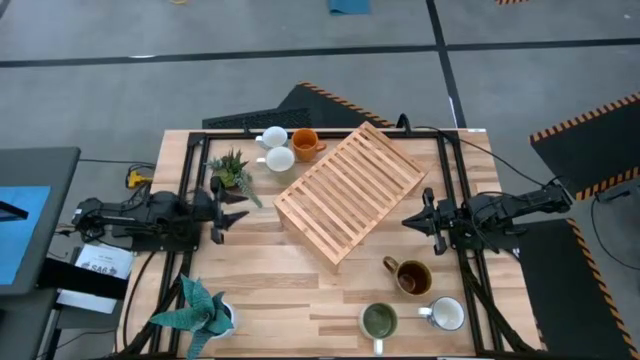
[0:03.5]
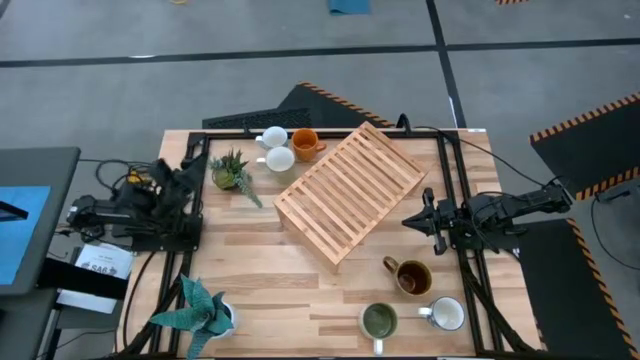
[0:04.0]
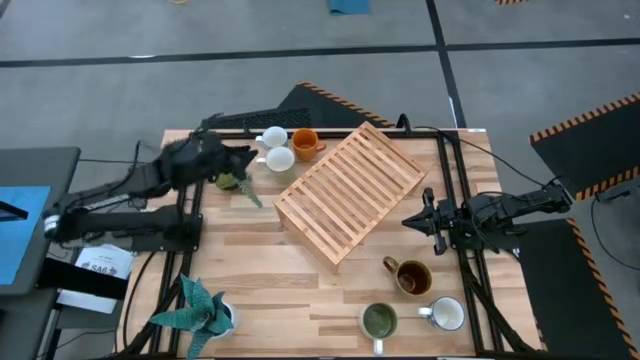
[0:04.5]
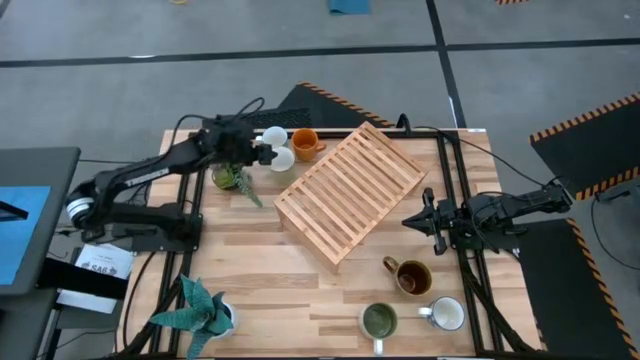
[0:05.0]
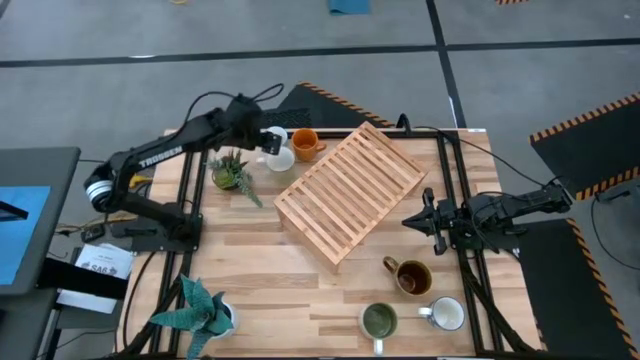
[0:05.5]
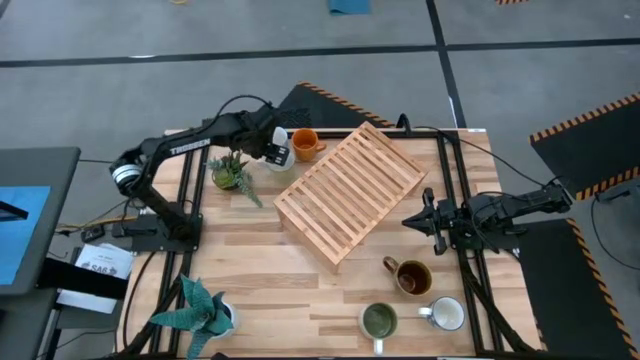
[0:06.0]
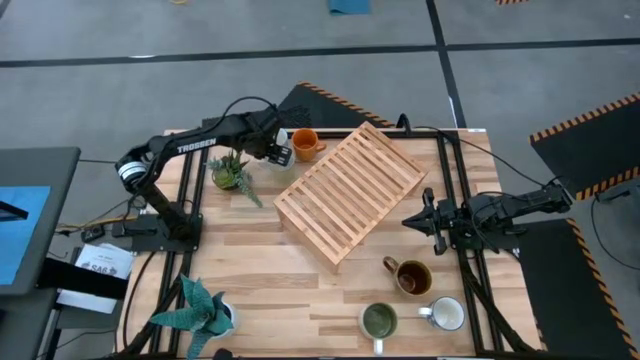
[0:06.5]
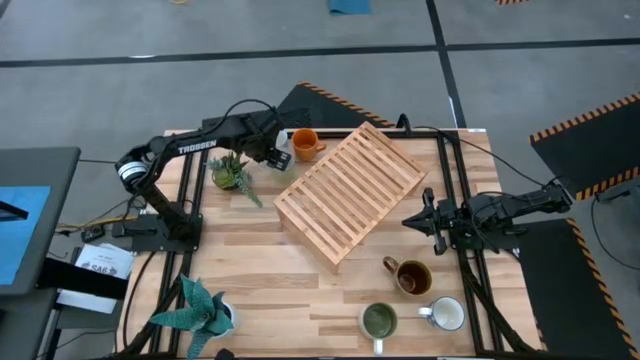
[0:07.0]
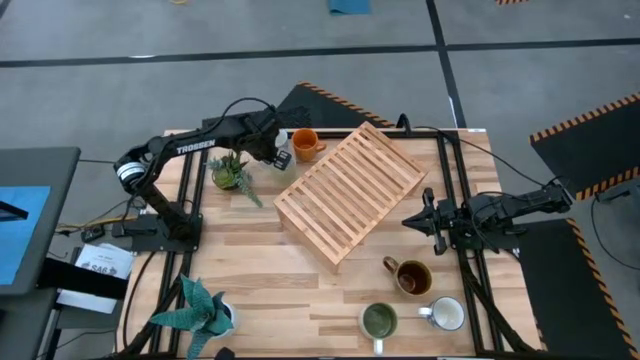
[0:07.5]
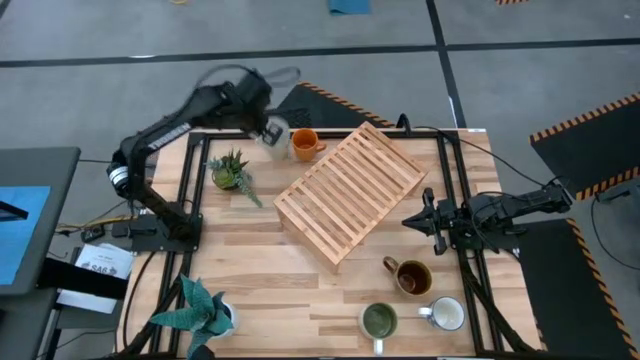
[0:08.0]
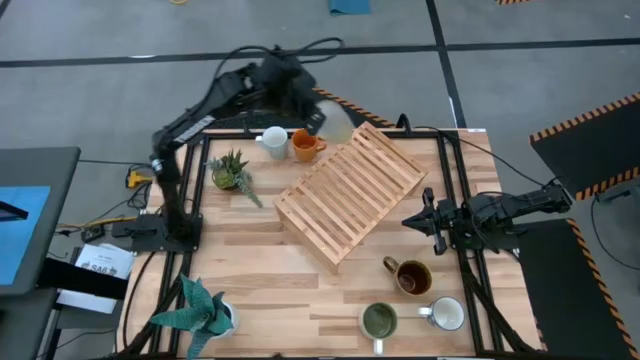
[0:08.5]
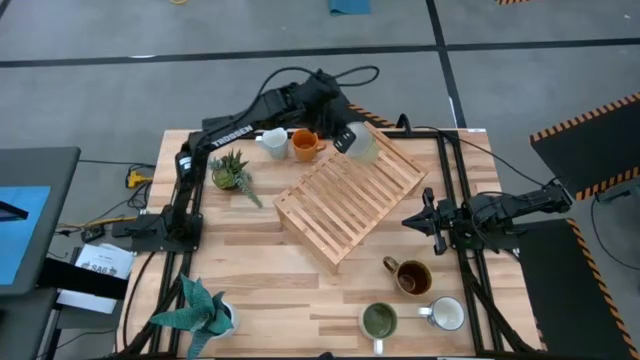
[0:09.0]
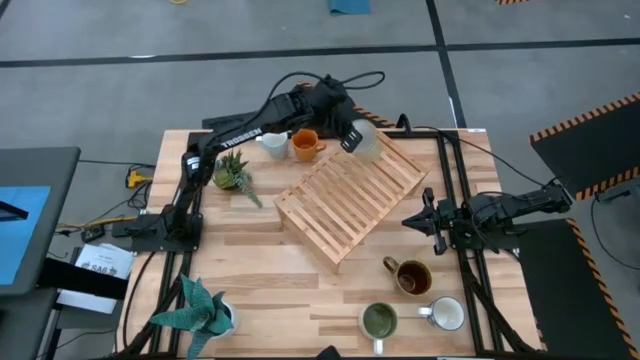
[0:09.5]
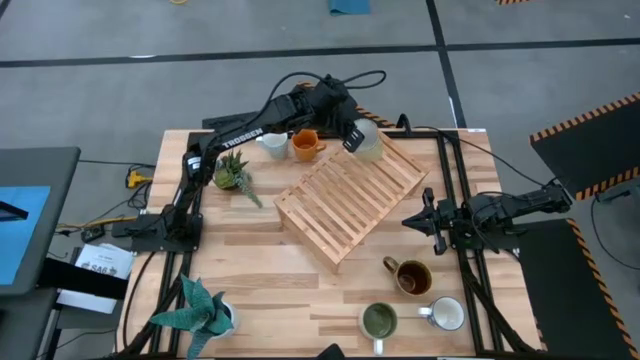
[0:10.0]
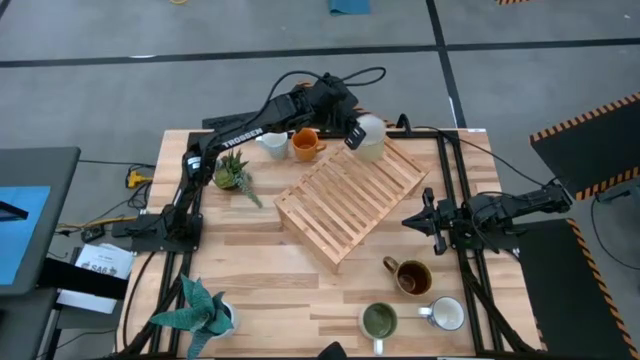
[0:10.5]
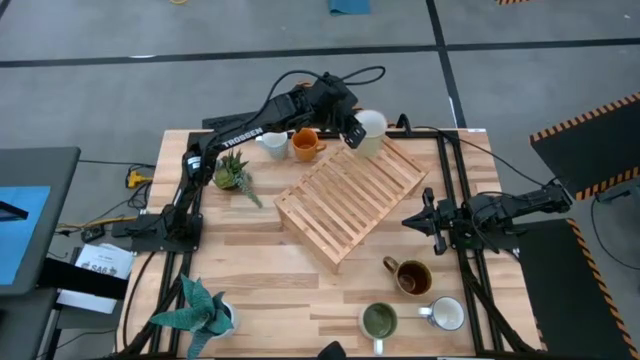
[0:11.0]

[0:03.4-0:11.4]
Task: Place coffee mugs
Put the light green mug on the shelf

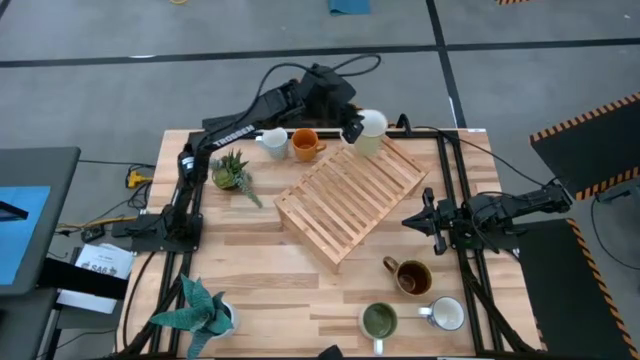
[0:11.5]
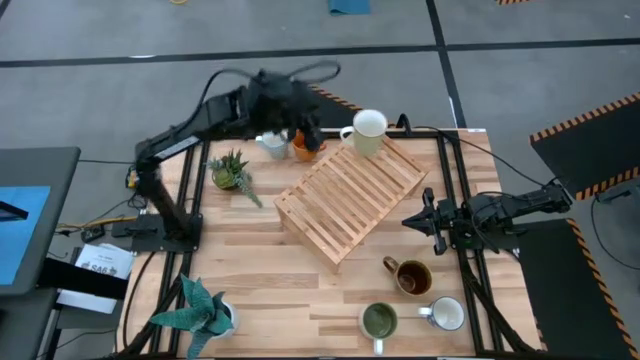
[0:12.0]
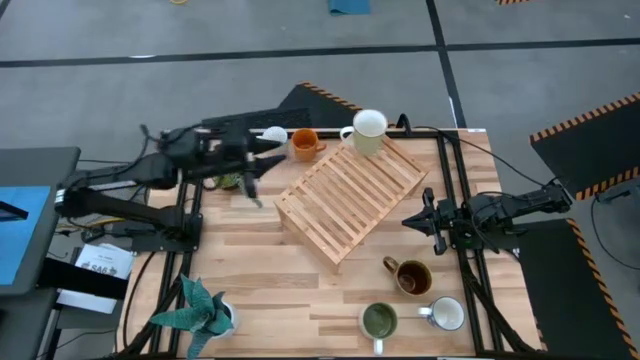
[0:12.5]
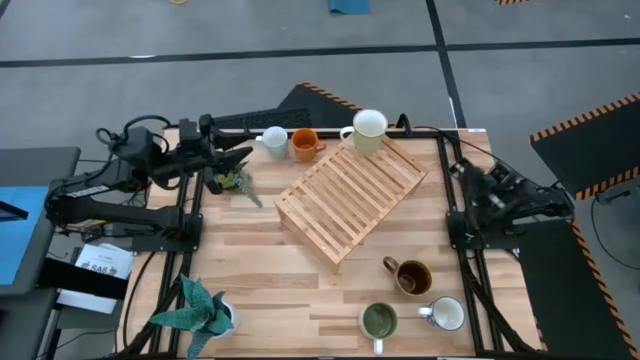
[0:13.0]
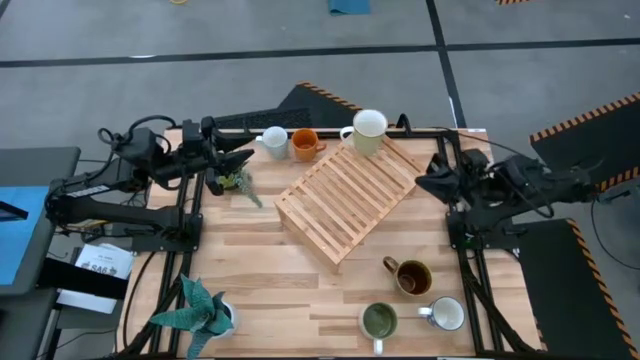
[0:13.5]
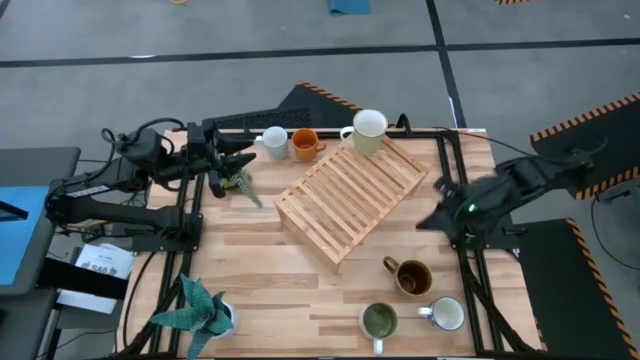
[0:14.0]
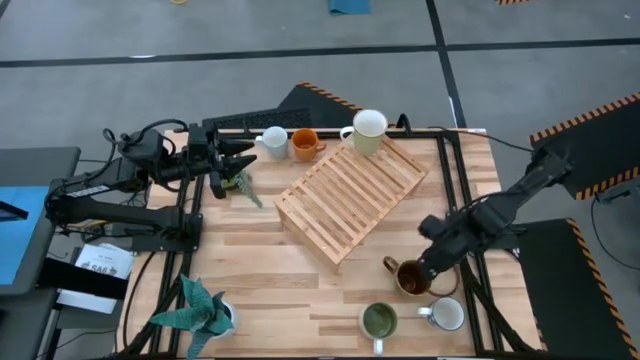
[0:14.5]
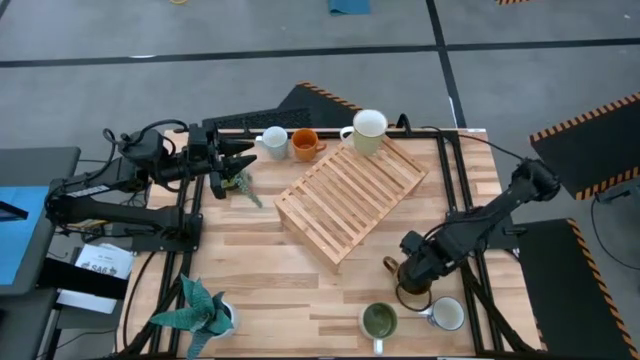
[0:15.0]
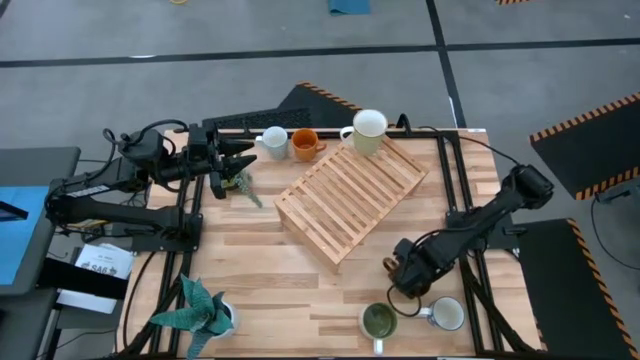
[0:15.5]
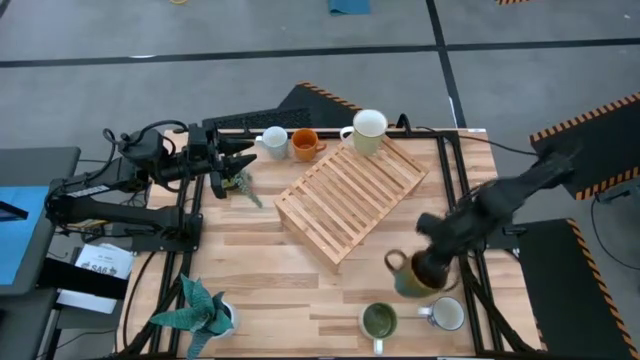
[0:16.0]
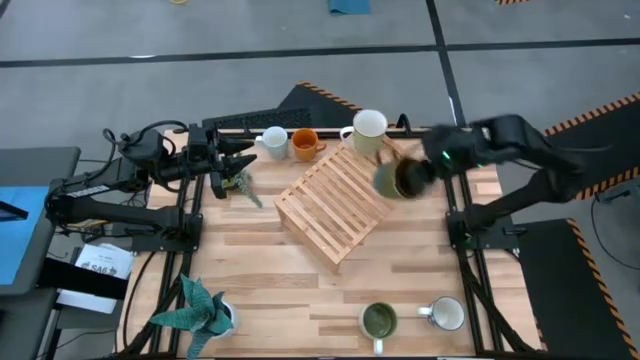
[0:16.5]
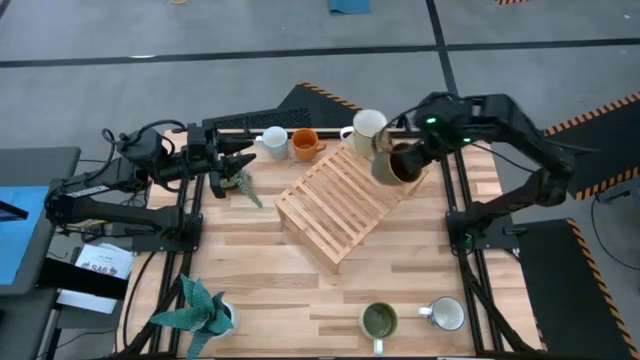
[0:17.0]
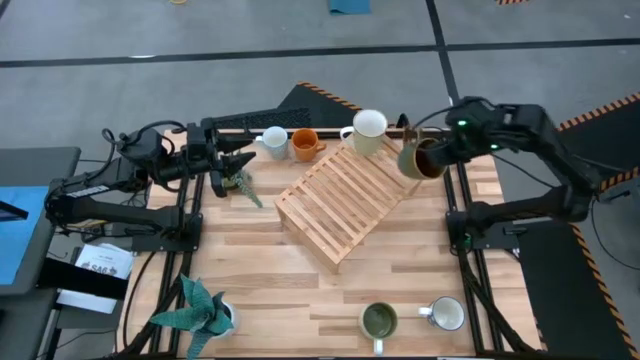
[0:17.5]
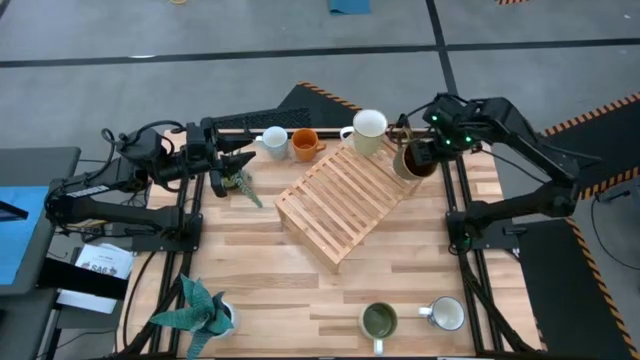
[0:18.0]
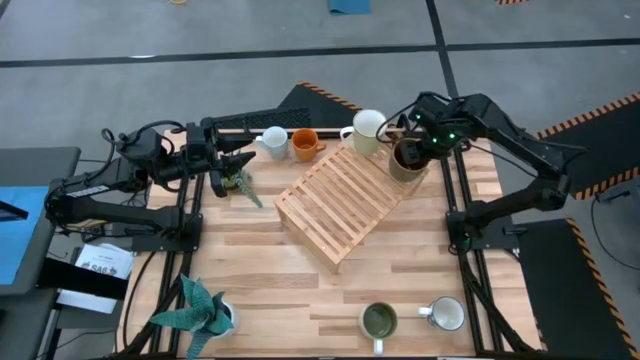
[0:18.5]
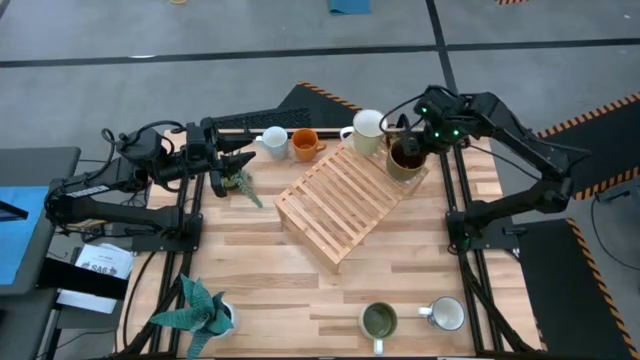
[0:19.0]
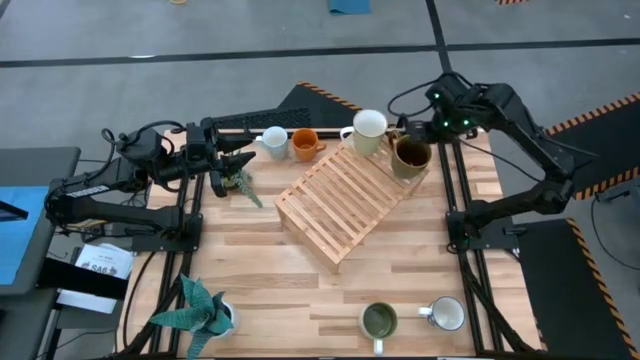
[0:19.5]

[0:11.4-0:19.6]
Put the green mug on the shelf

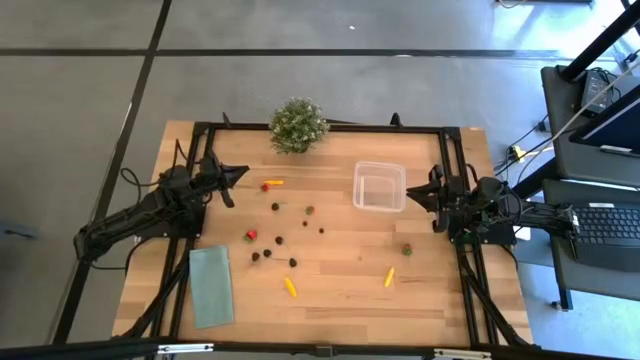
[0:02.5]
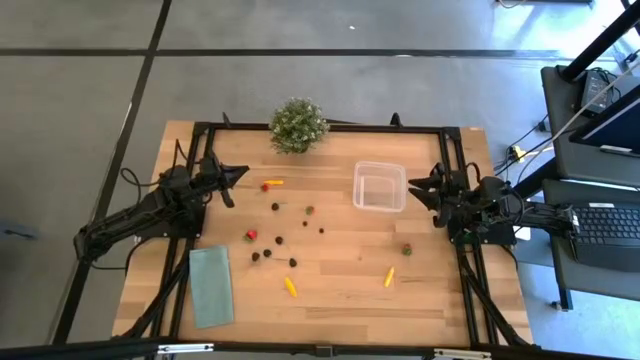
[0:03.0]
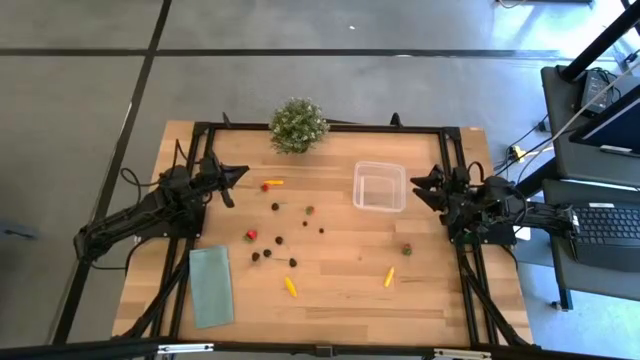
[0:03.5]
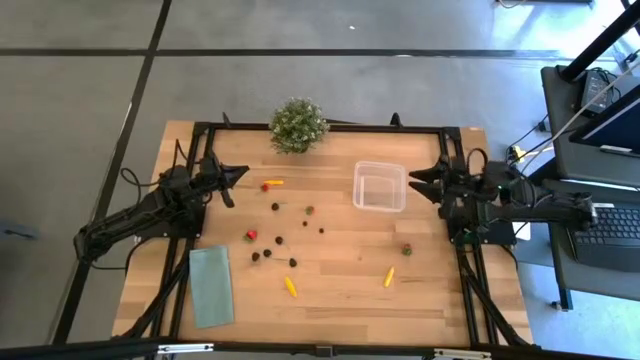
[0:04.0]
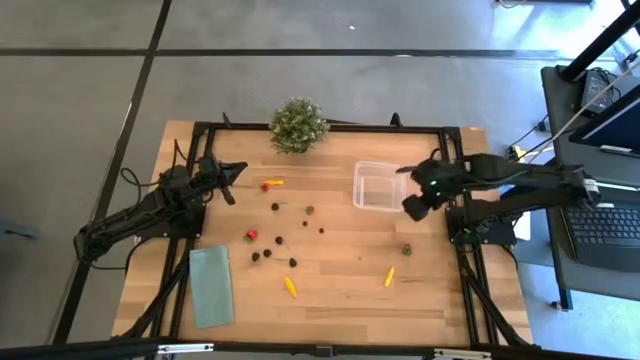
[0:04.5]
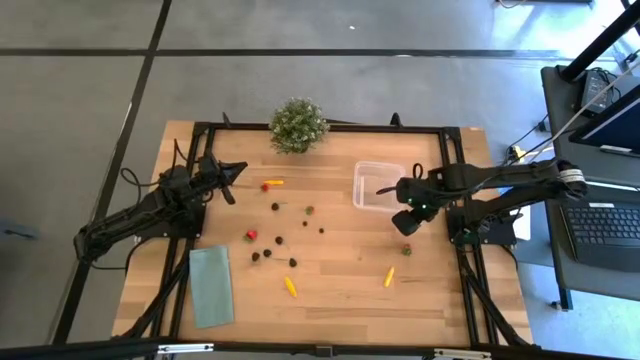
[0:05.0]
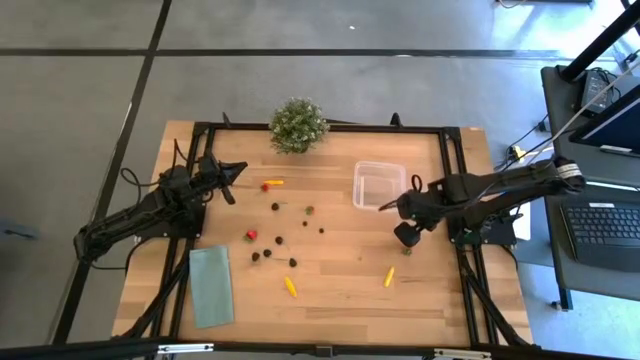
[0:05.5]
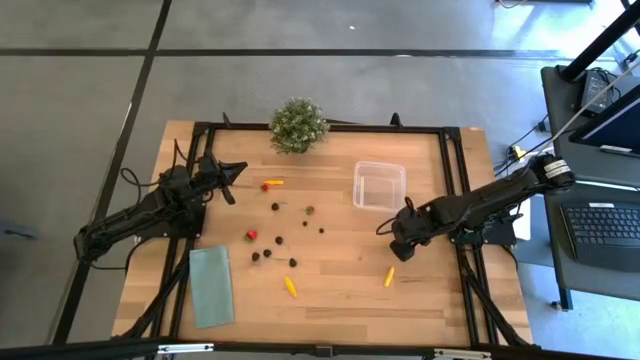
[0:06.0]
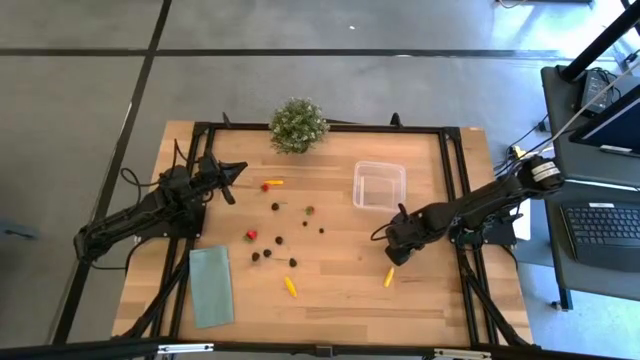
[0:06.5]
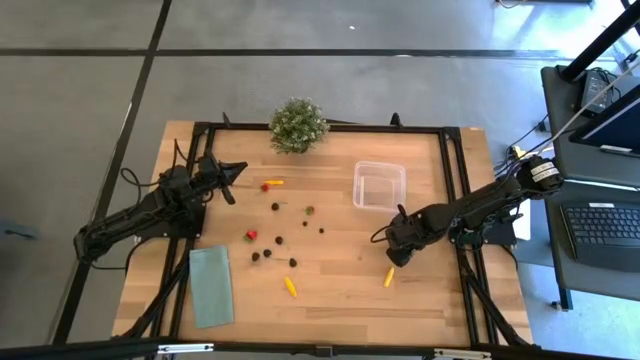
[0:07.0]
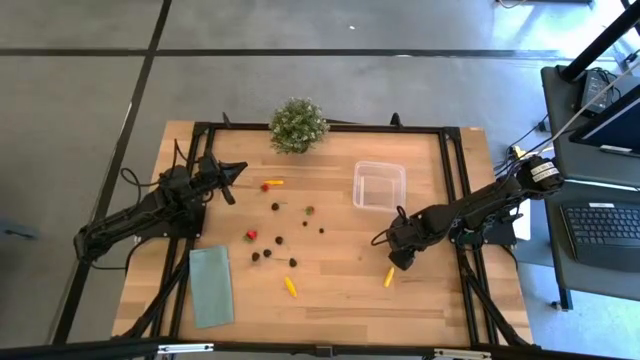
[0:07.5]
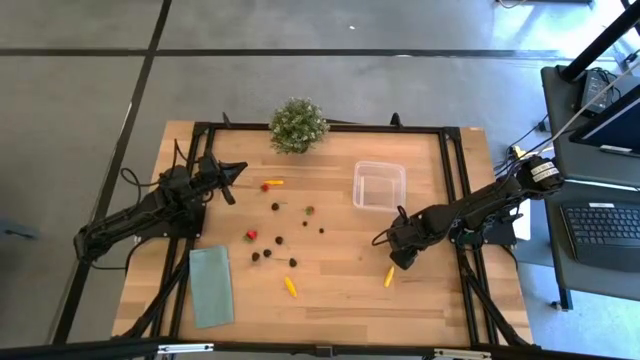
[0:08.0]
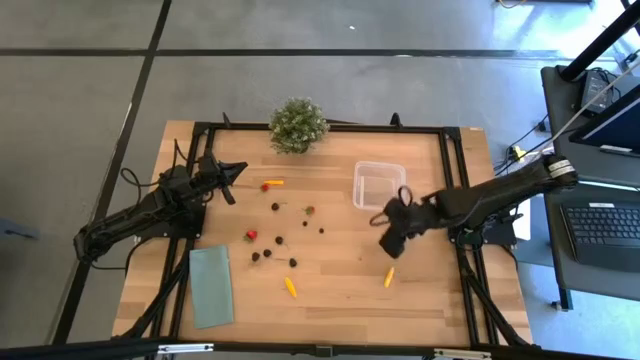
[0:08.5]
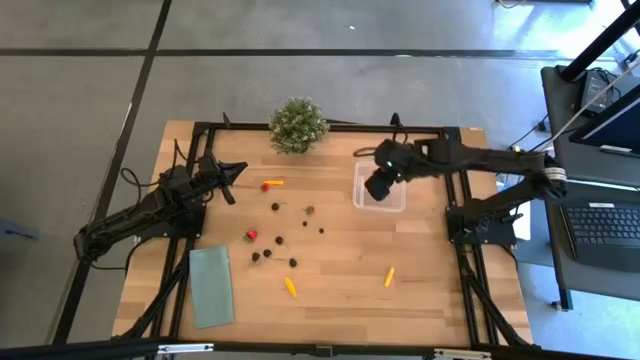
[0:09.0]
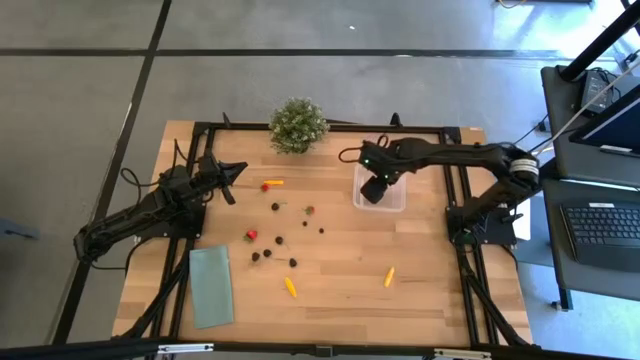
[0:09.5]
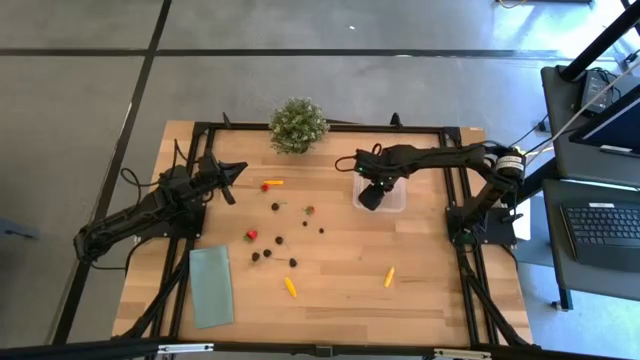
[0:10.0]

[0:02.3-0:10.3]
Task: Pick and placing Produce into tupperware
Put the right strawberry into the transparent bin
